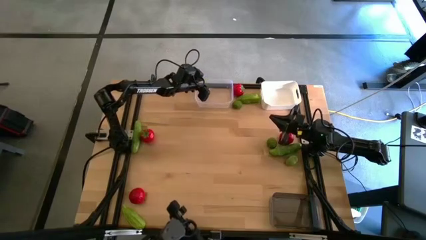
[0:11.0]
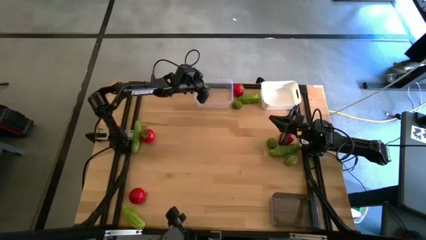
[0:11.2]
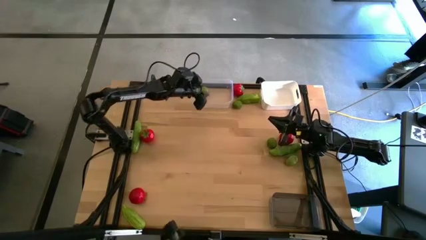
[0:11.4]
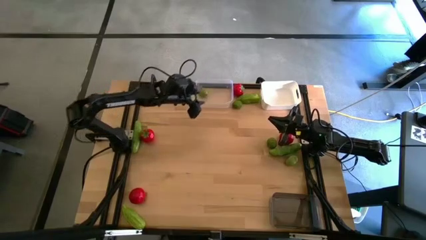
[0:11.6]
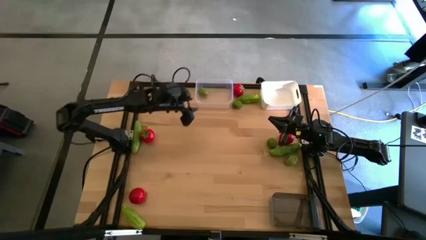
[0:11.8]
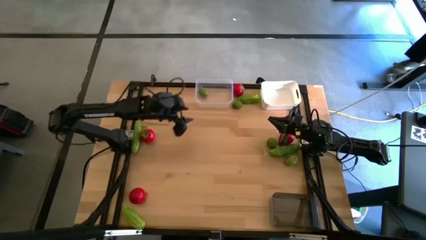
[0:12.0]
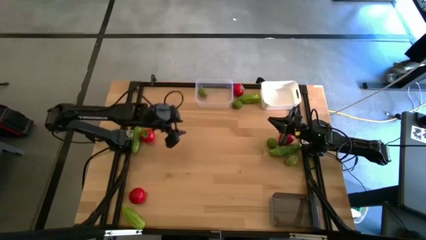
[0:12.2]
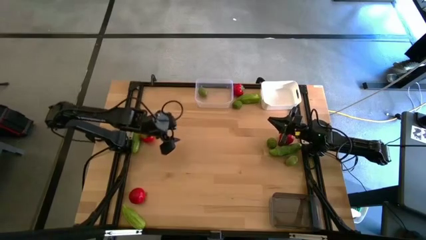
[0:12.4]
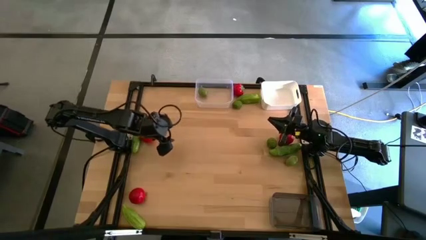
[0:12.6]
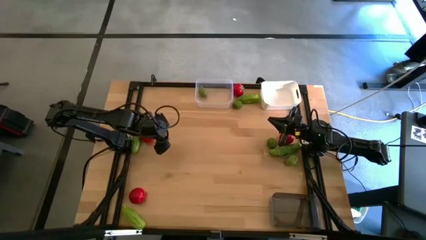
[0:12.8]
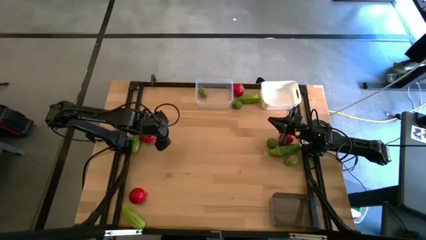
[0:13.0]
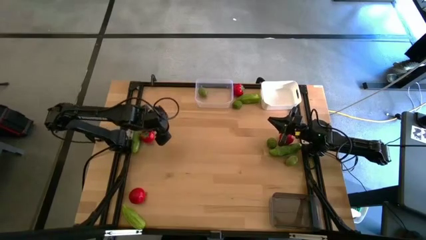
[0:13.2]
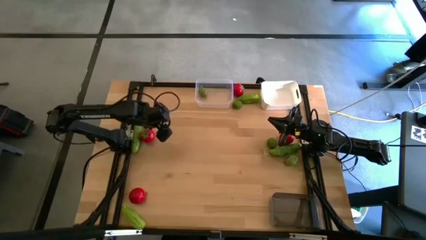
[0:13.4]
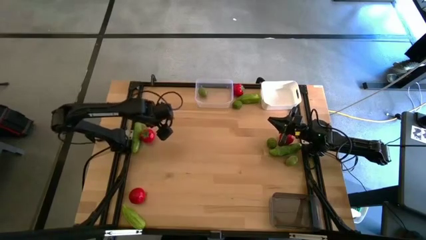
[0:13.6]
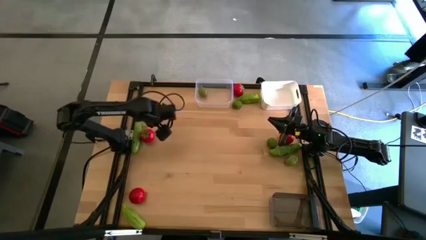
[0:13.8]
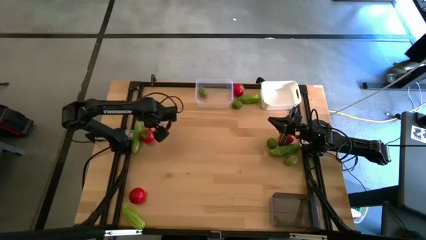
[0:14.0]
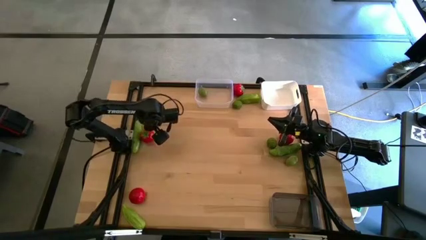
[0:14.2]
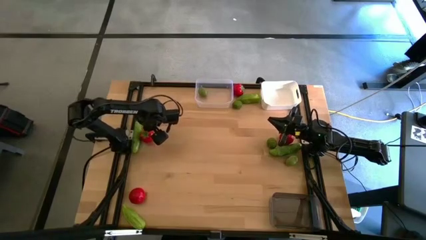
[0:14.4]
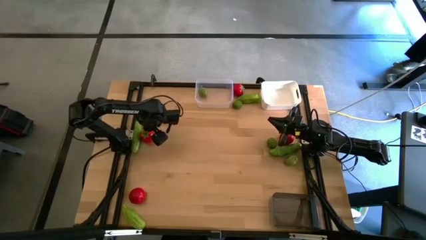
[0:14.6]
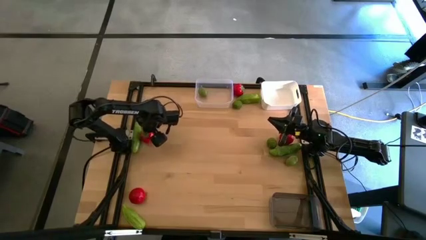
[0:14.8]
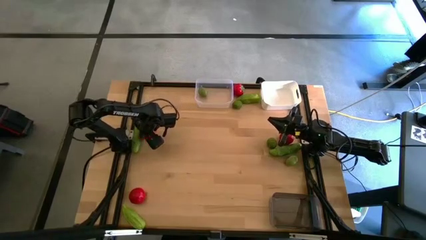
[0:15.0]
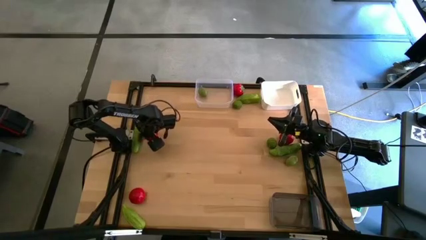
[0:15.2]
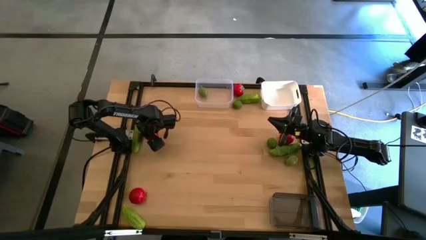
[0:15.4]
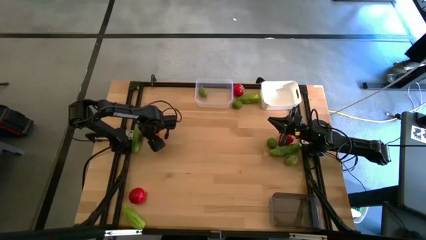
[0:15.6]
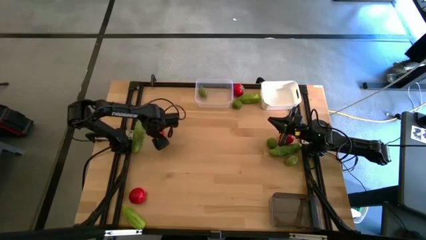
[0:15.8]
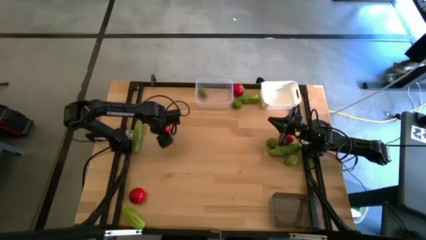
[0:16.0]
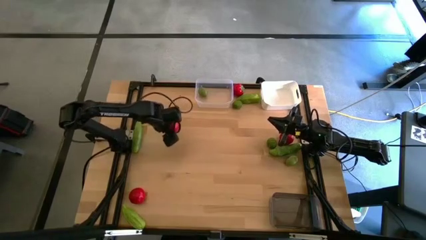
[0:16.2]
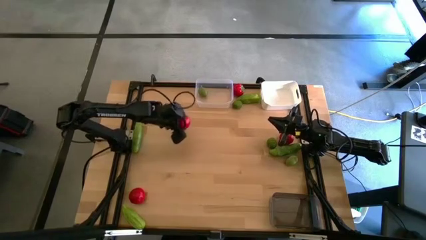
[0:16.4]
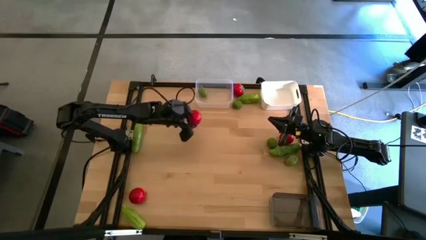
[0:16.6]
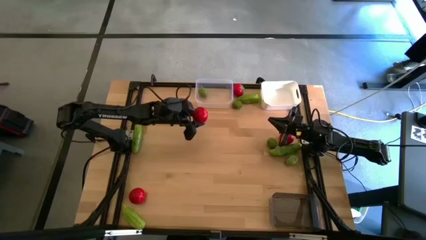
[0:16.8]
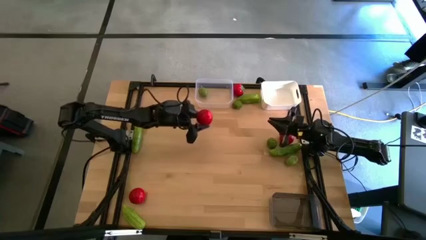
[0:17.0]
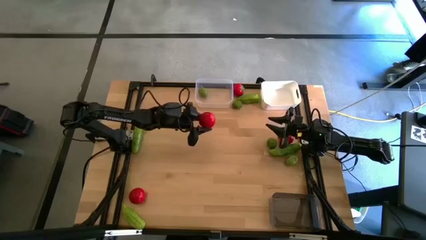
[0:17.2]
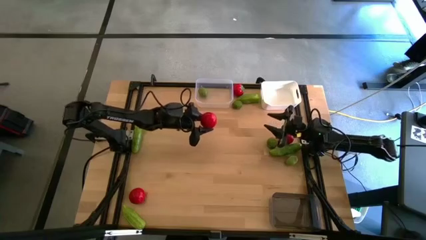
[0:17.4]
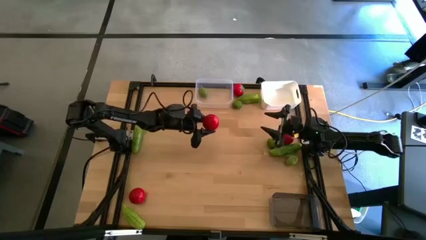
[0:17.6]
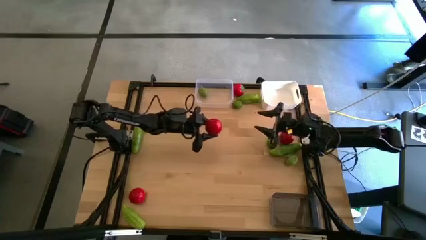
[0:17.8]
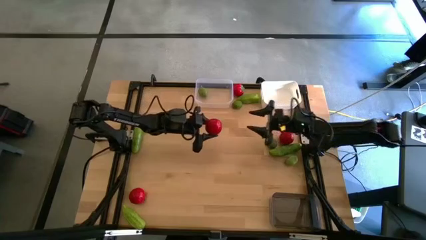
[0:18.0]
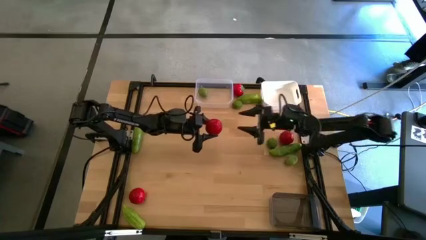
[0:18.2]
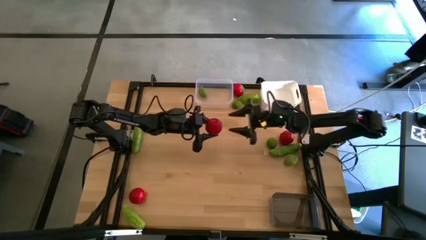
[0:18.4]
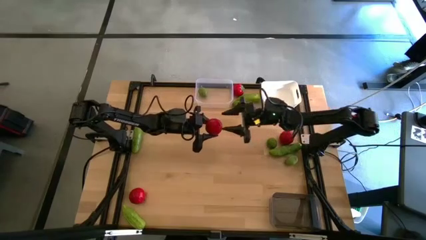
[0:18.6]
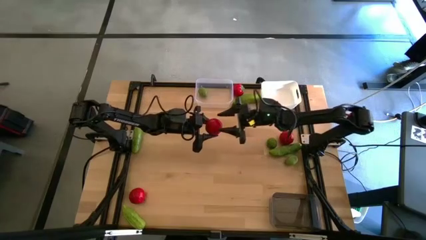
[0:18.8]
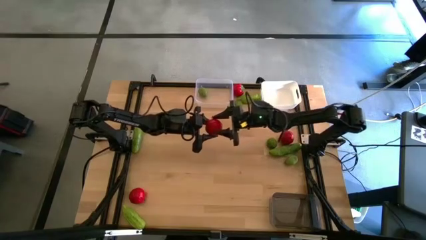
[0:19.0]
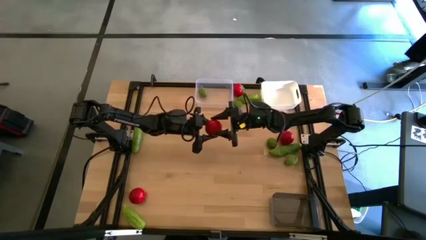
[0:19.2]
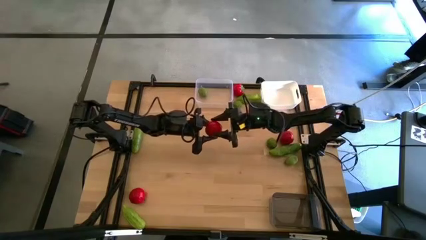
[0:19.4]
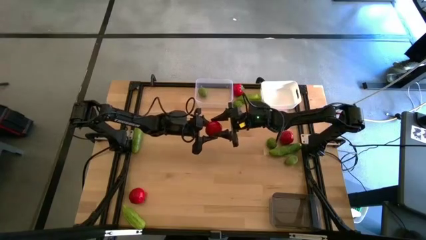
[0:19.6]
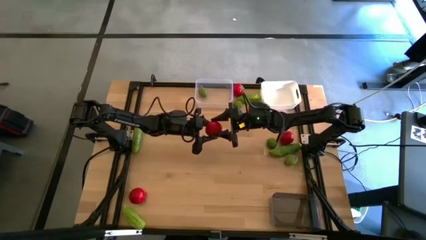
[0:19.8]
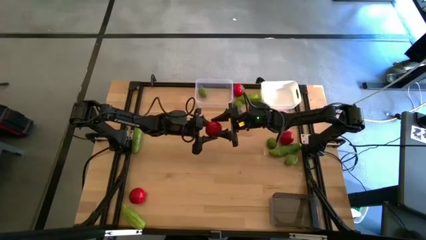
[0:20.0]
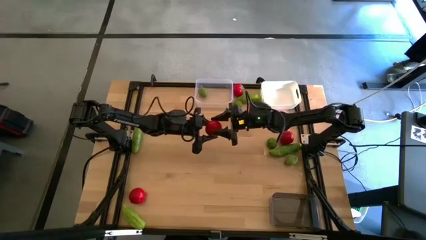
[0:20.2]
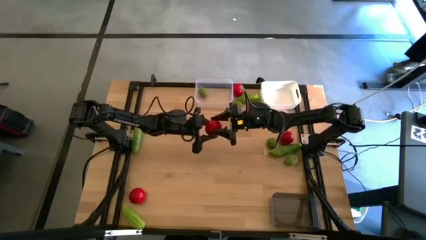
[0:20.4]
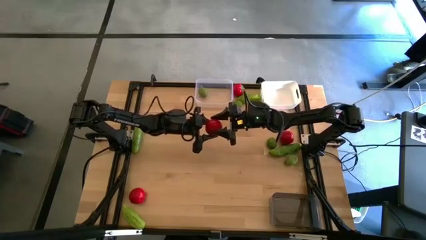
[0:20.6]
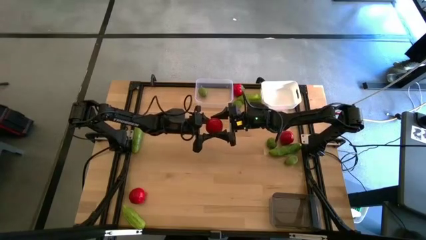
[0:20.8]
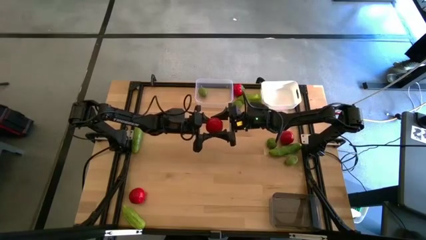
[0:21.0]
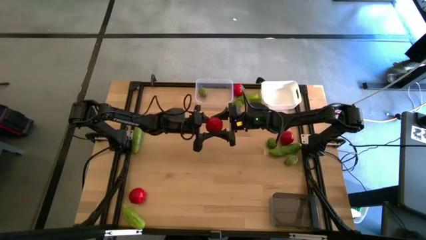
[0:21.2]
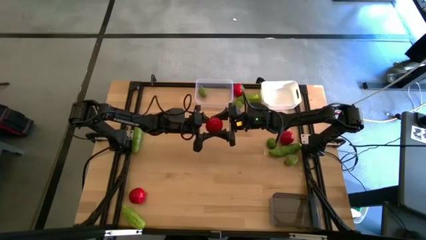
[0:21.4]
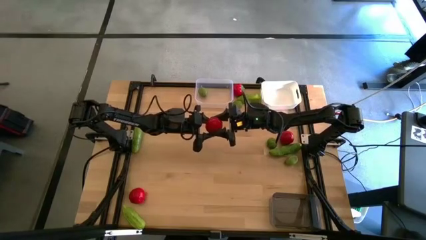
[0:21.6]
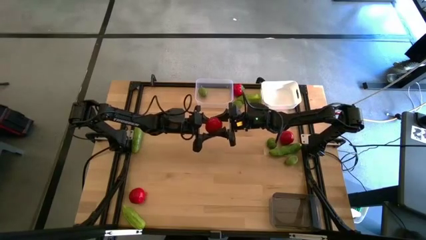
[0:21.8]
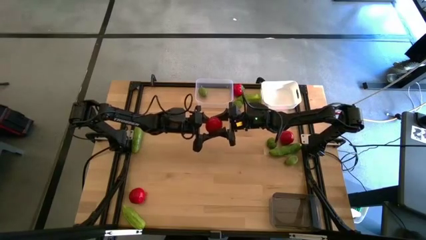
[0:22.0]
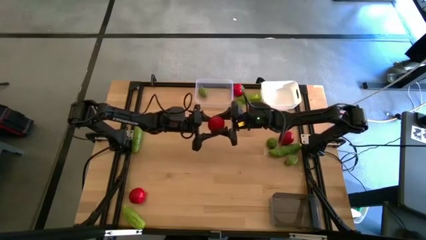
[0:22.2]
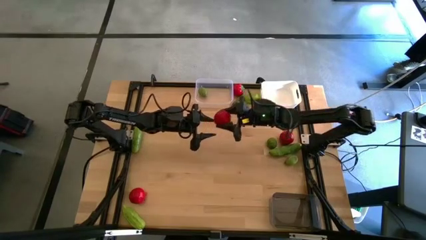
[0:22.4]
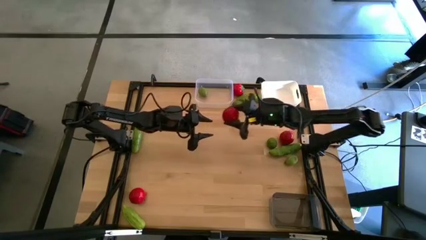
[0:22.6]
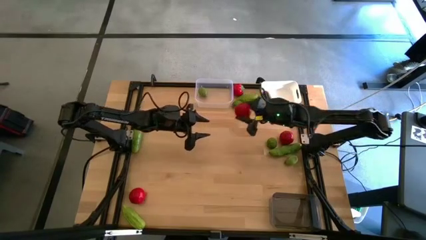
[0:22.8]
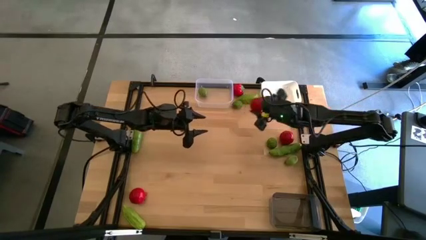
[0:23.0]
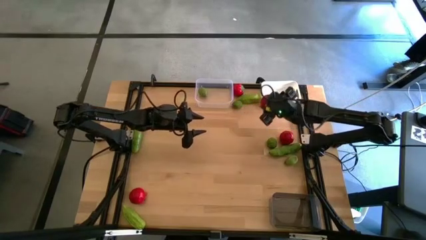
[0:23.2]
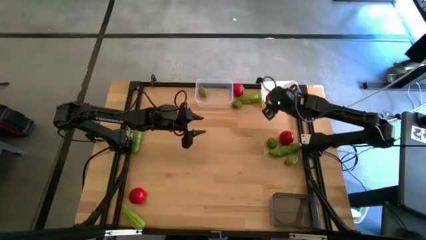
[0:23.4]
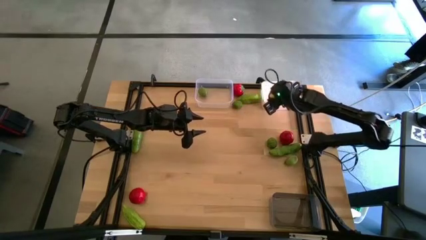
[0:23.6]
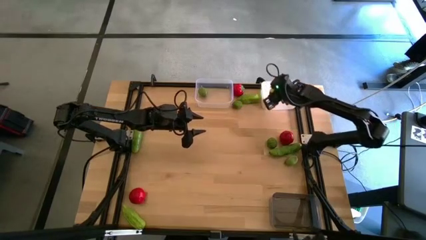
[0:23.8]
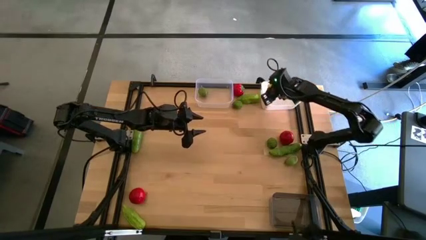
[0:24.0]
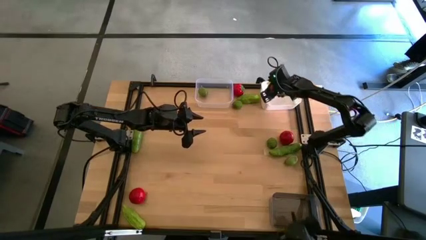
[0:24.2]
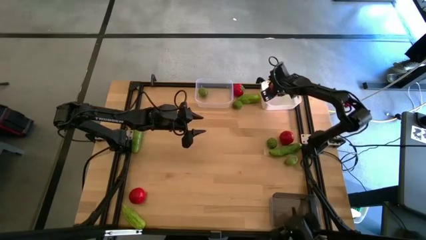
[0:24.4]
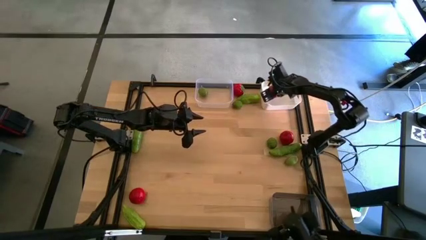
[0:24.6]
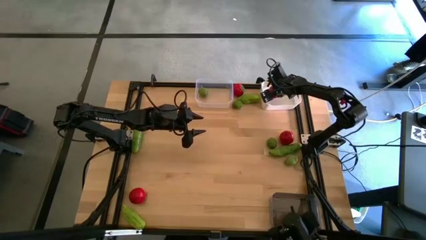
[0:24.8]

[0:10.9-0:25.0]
Task: Sort produce into baskets
Put the red tomato into the white bin
